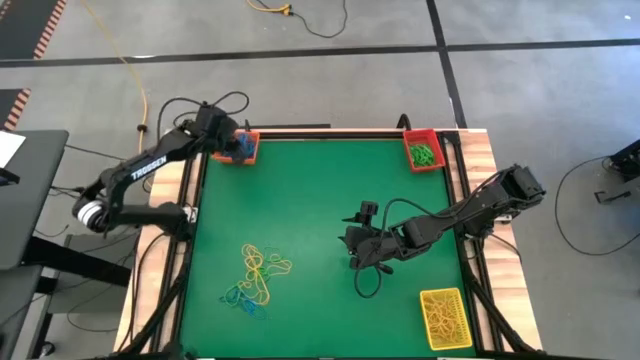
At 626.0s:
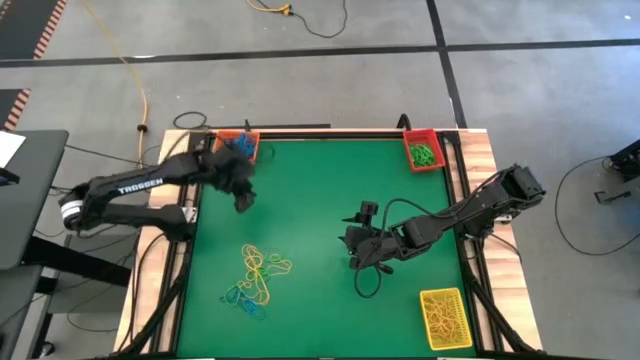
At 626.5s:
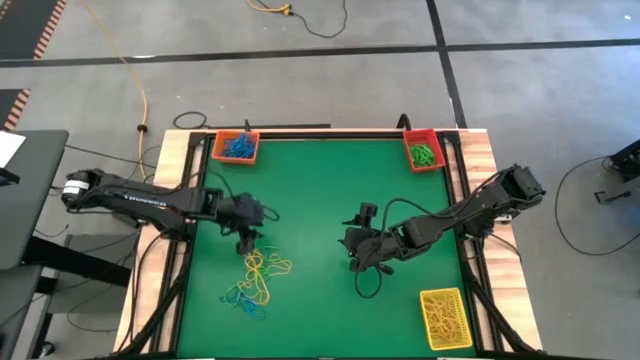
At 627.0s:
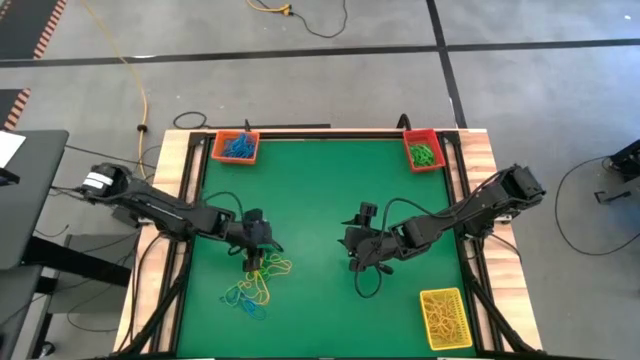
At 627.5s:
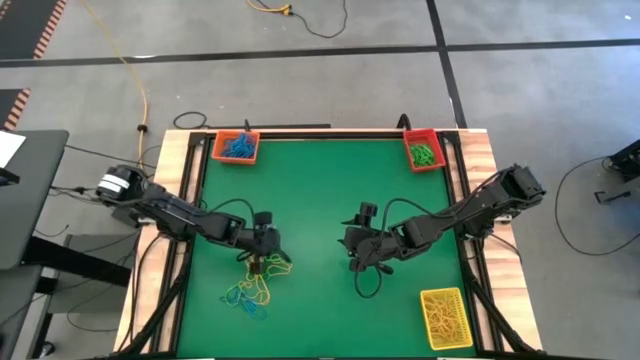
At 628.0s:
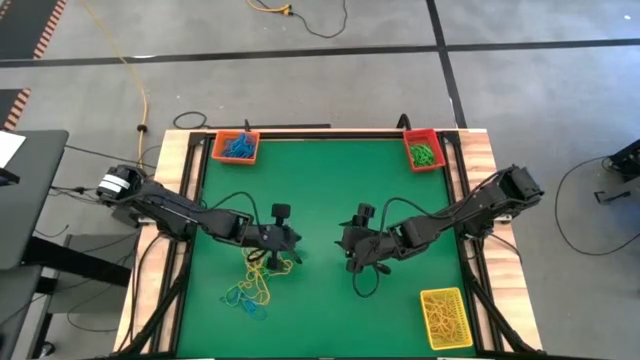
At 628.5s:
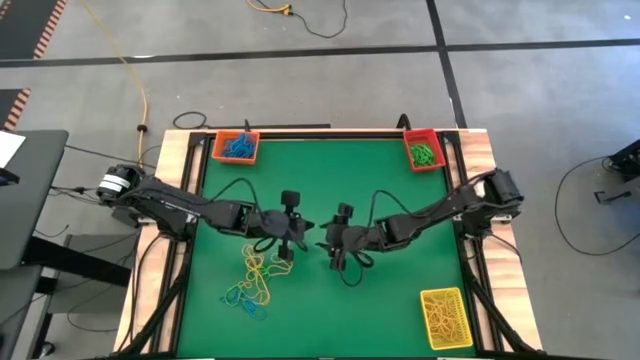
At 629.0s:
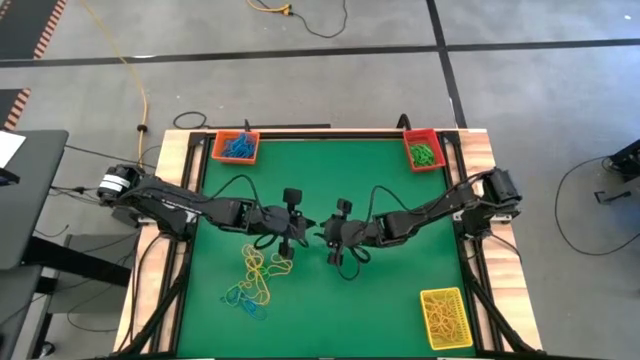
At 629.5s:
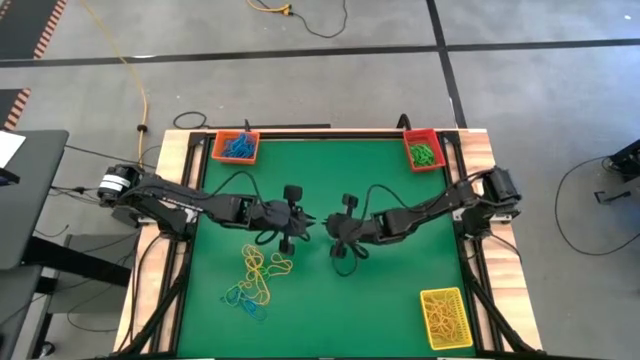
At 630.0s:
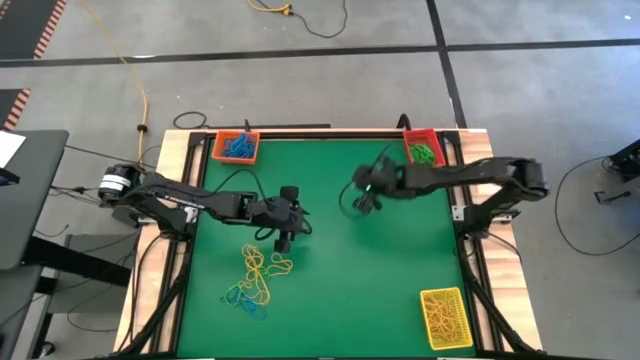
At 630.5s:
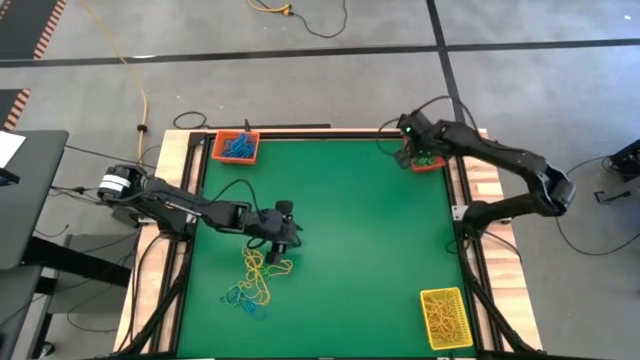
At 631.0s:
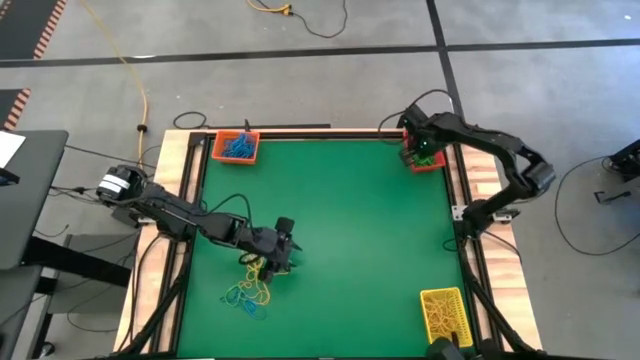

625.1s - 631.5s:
Task: Sort rubber bands into baskets
Put the left green rubber band into the red bin

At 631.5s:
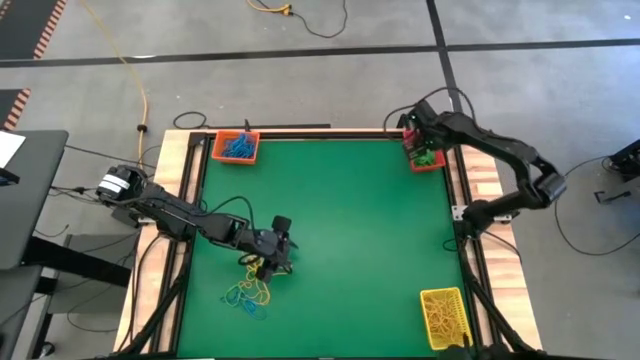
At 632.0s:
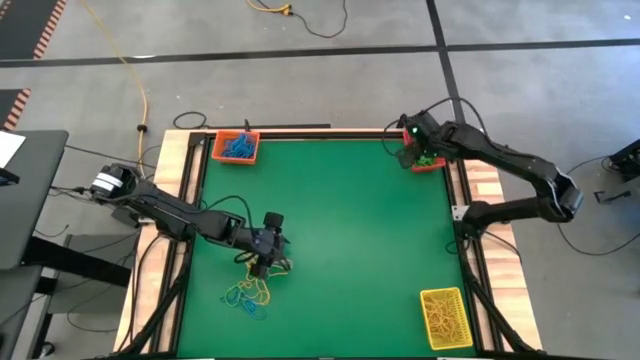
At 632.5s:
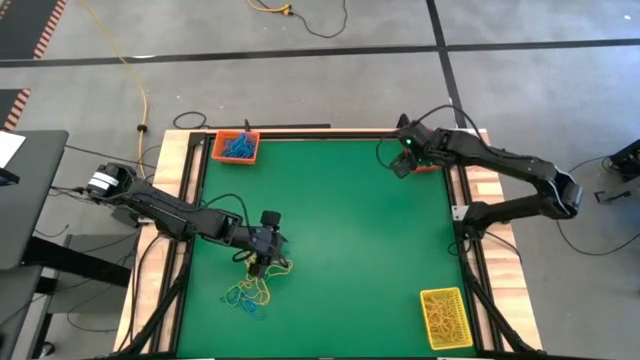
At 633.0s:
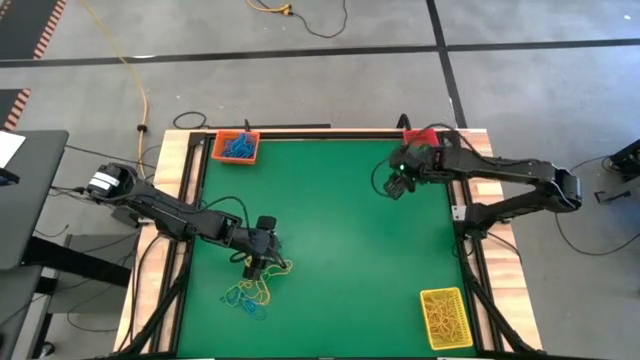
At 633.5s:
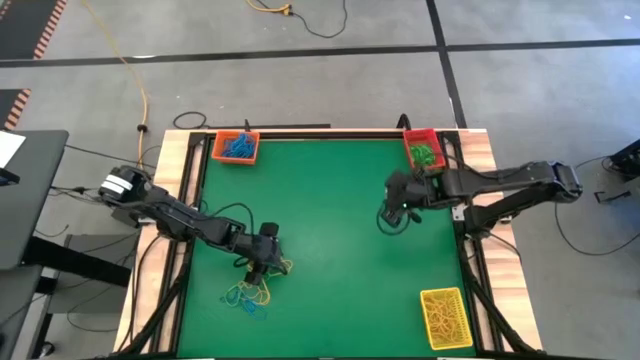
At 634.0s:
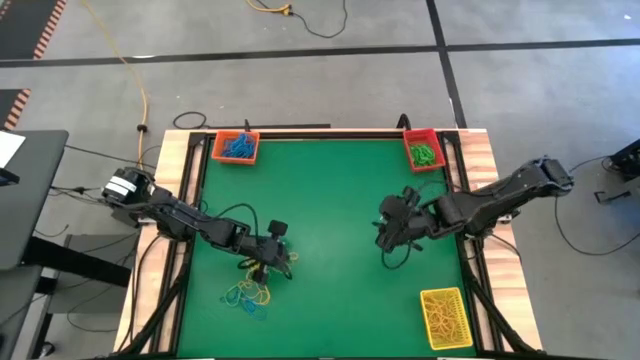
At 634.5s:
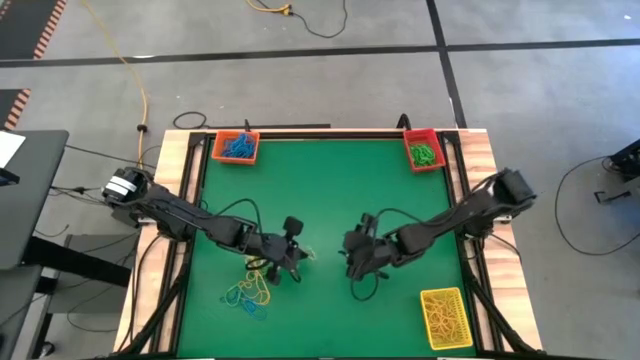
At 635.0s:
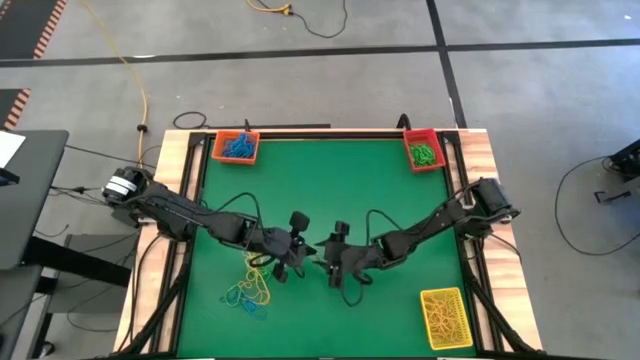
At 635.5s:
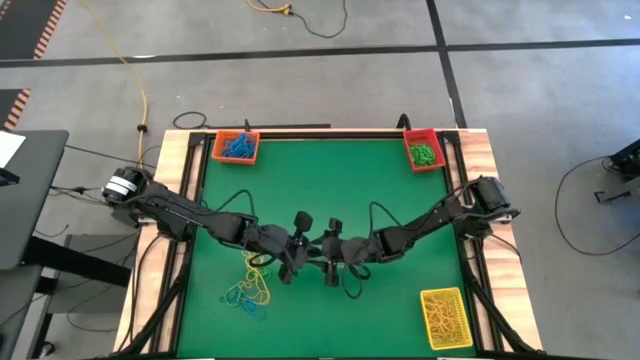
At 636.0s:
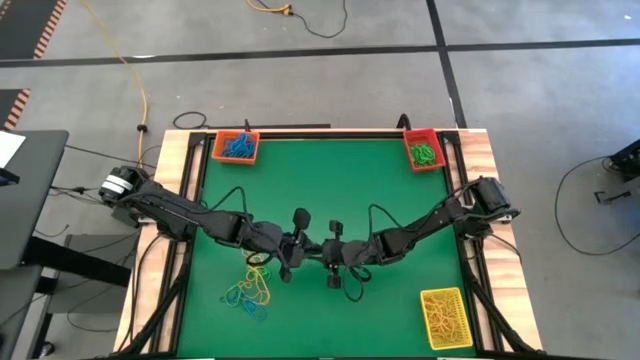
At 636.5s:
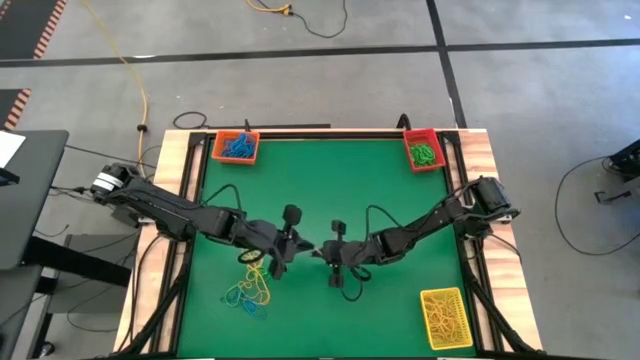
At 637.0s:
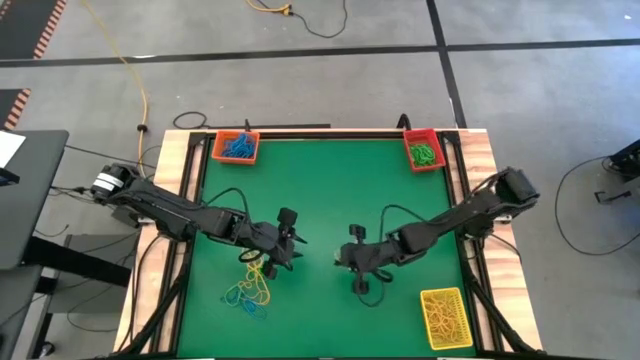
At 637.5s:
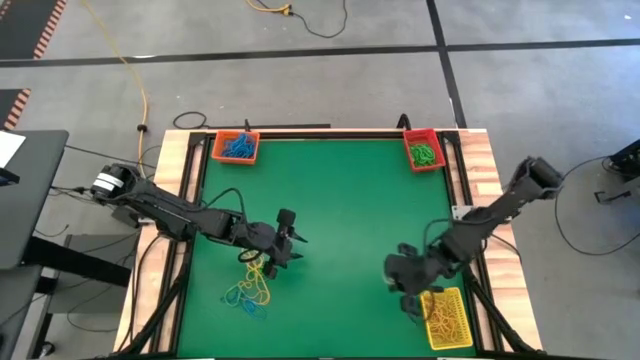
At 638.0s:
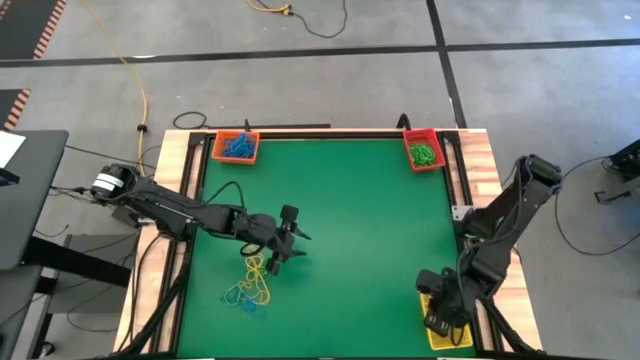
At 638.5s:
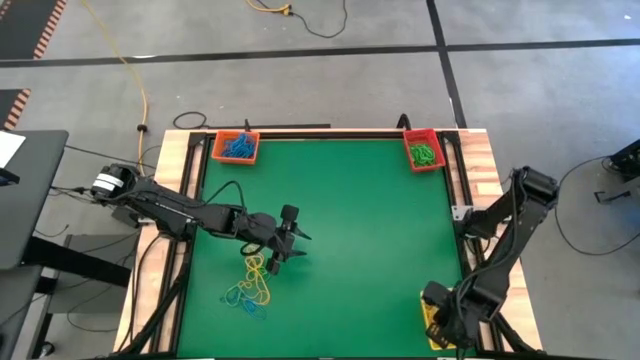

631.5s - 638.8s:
Put the left yellow rubber band into the yellow bin

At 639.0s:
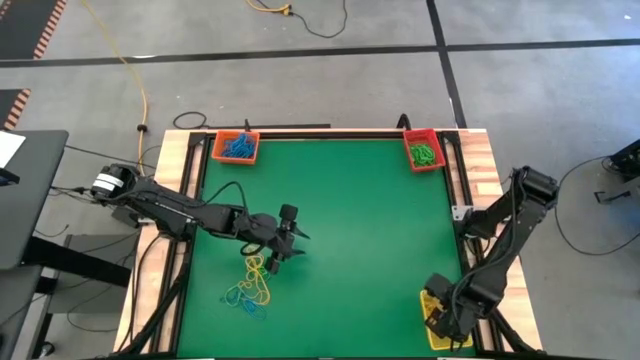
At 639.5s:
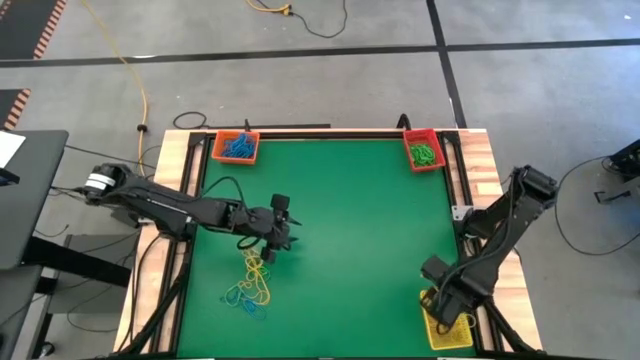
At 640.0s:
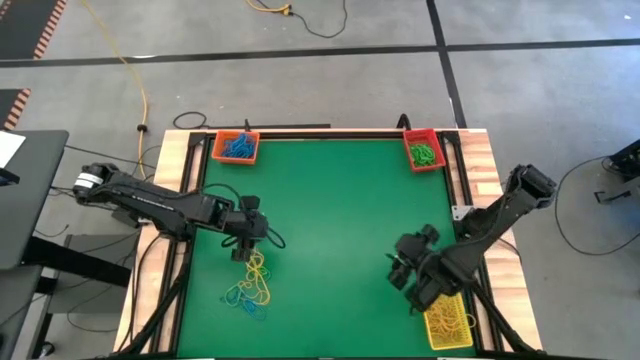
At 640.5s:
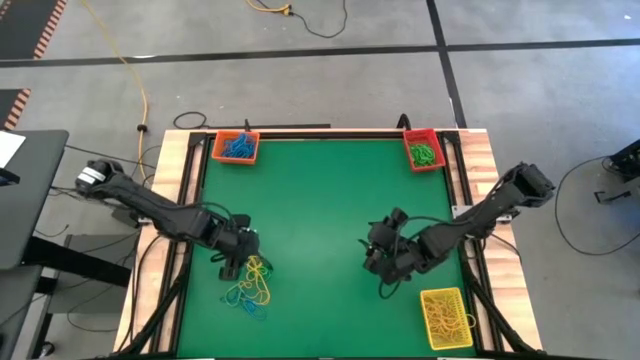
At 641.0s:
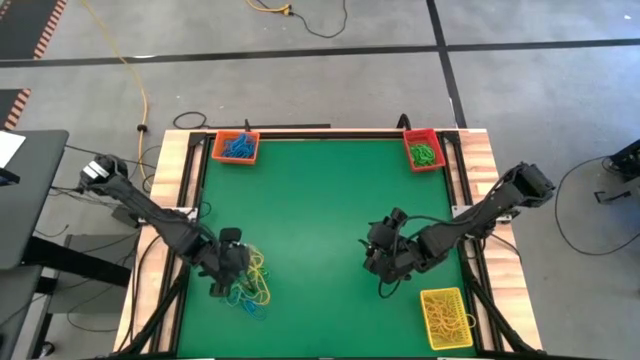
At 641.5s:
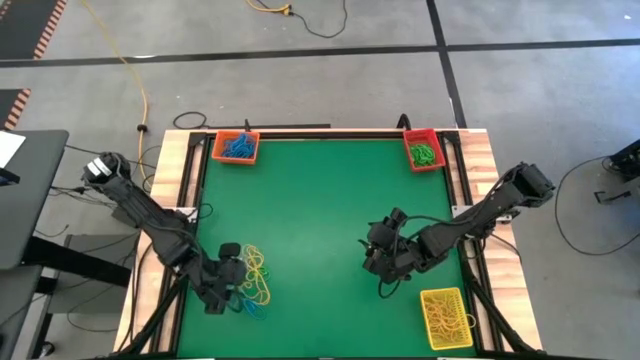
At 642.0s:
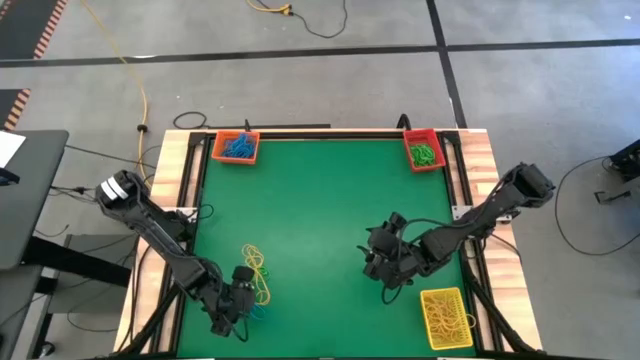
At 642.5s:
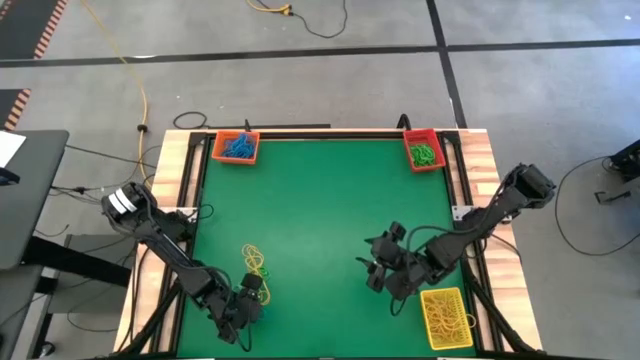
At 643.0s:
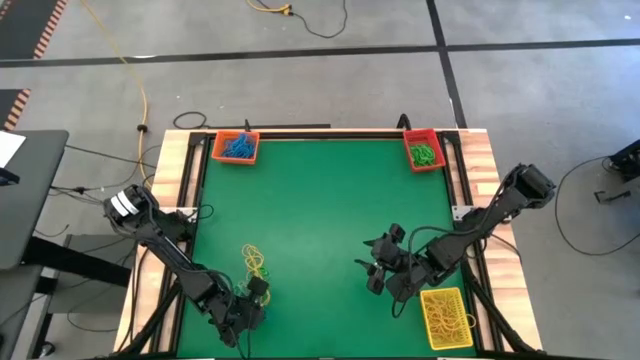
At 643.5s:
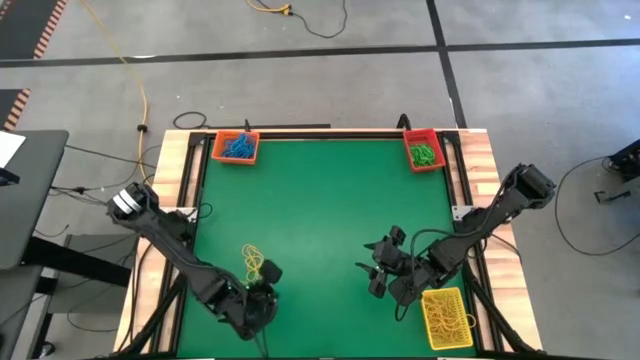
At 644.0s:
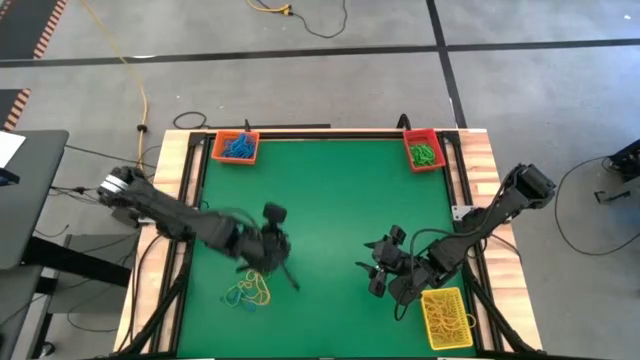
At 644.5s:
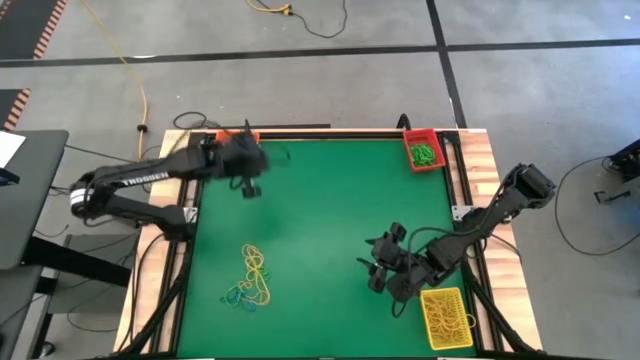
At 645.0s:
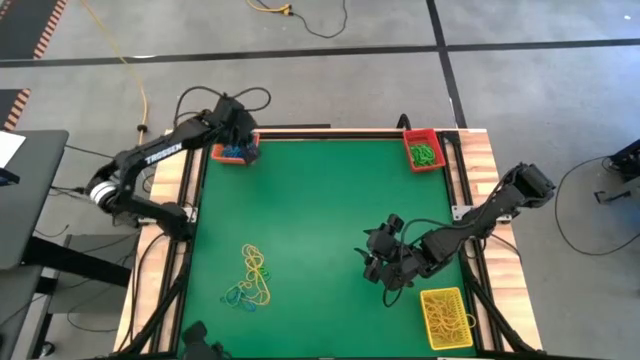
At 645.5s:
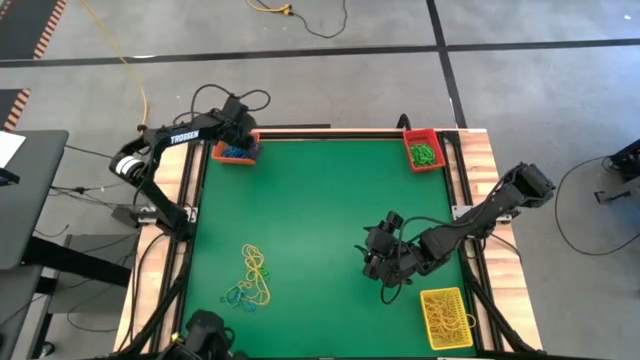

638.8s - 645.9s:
Put the left blue rubber band into the orange bin
